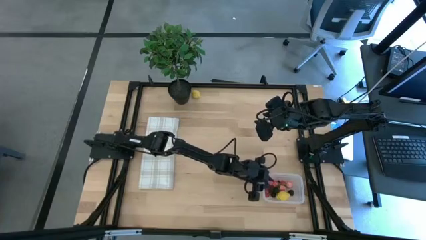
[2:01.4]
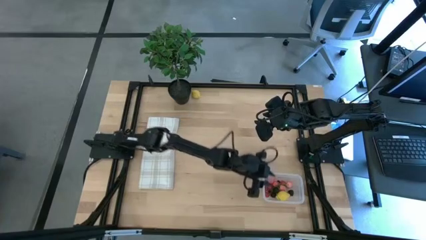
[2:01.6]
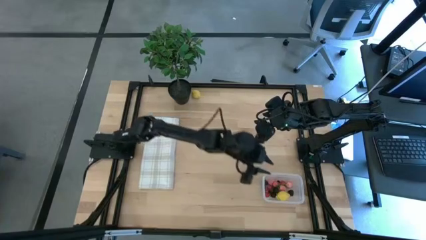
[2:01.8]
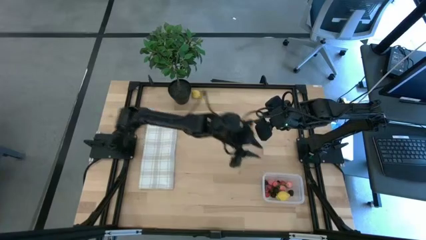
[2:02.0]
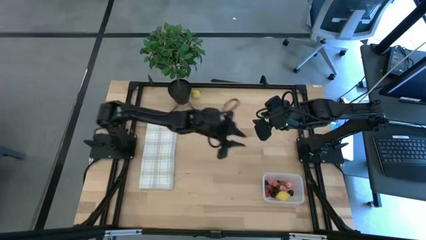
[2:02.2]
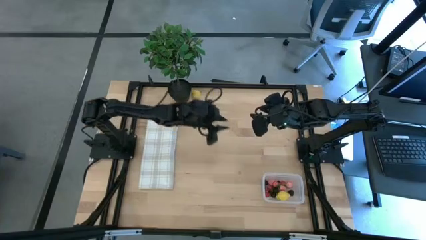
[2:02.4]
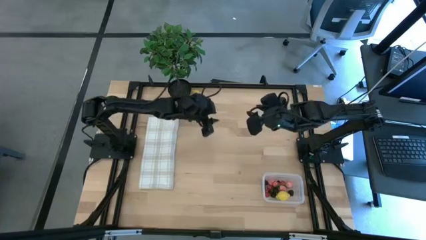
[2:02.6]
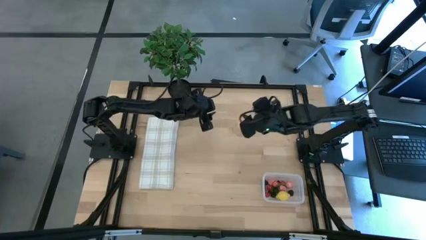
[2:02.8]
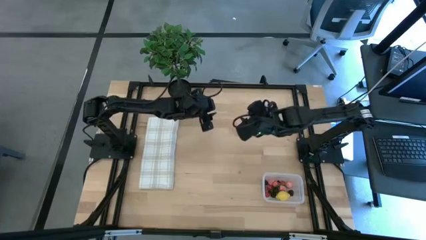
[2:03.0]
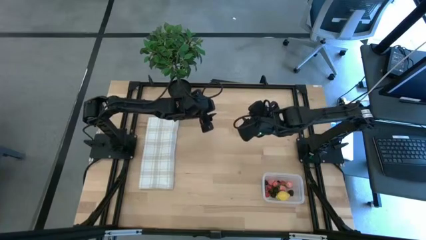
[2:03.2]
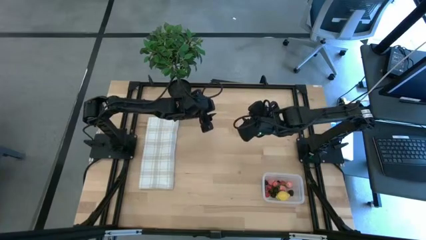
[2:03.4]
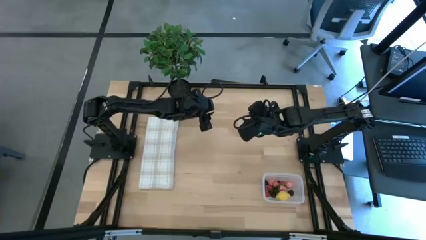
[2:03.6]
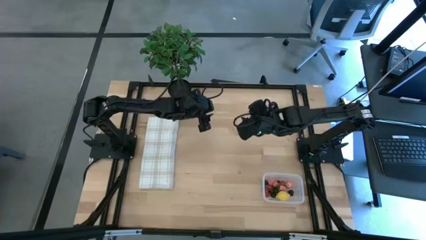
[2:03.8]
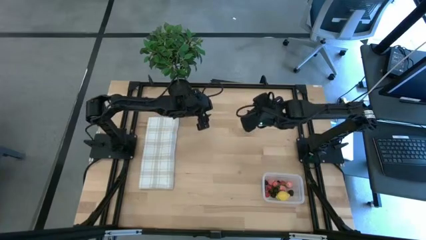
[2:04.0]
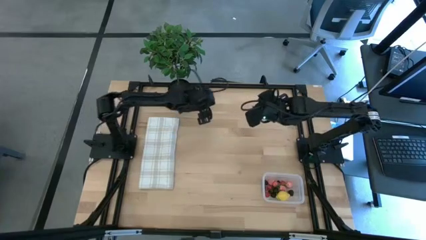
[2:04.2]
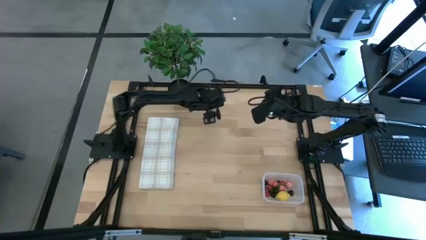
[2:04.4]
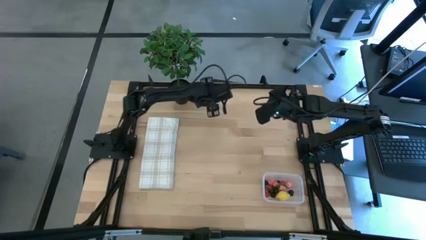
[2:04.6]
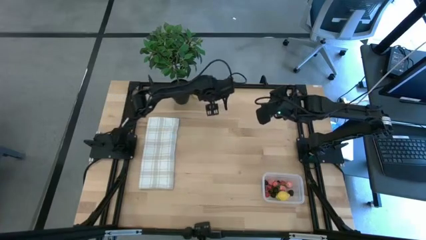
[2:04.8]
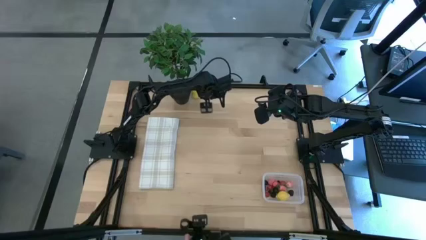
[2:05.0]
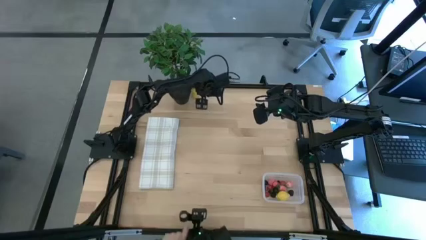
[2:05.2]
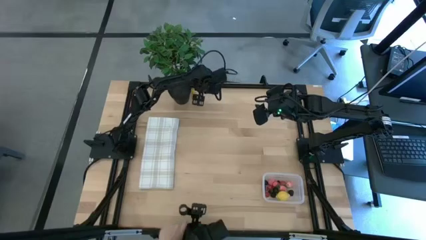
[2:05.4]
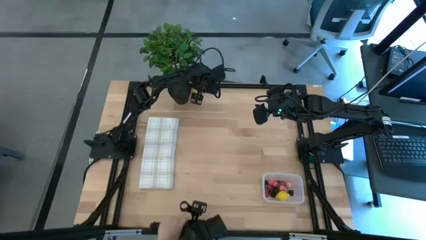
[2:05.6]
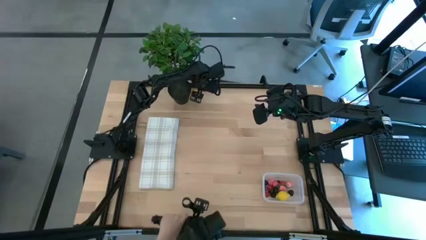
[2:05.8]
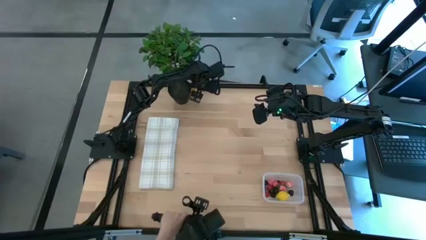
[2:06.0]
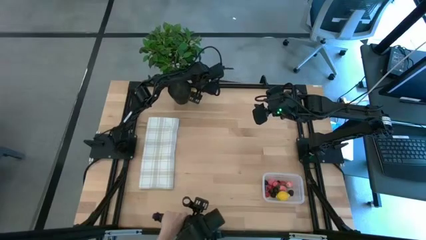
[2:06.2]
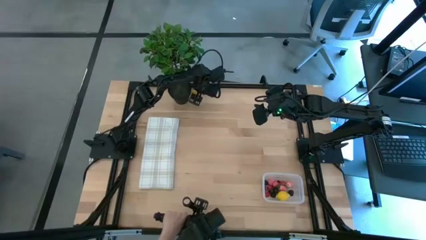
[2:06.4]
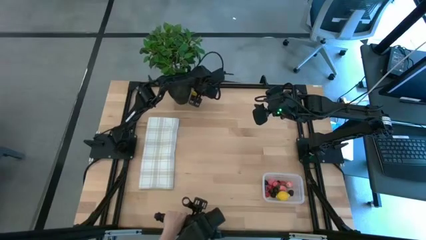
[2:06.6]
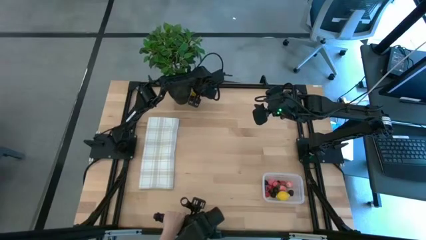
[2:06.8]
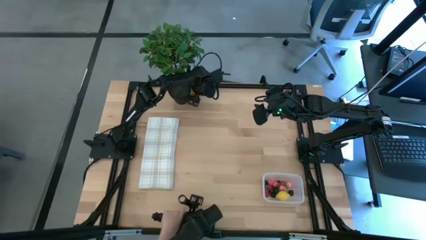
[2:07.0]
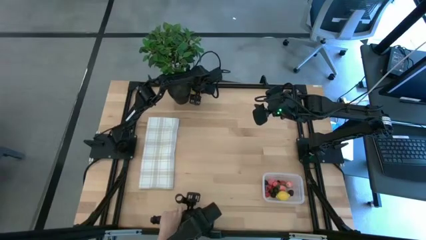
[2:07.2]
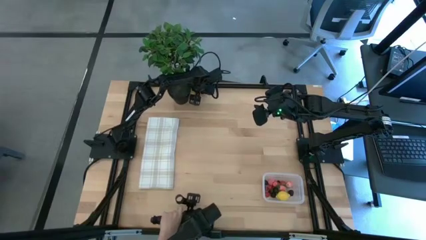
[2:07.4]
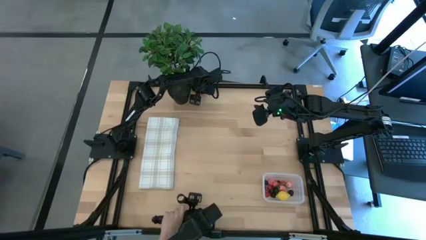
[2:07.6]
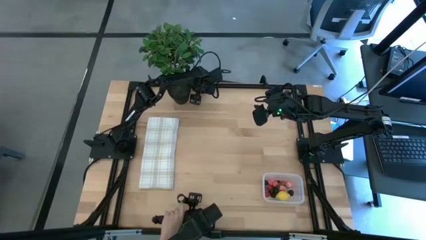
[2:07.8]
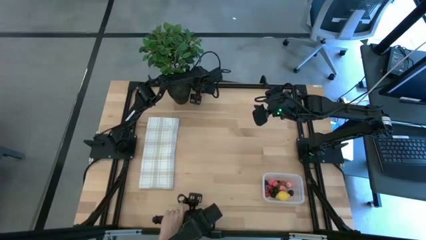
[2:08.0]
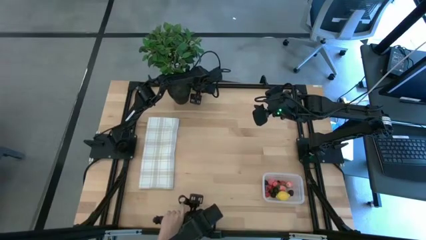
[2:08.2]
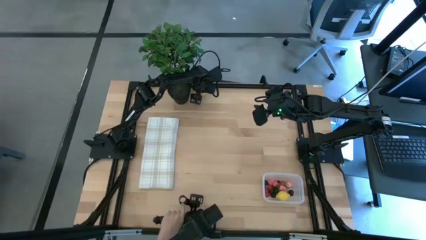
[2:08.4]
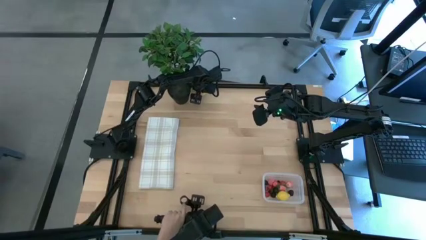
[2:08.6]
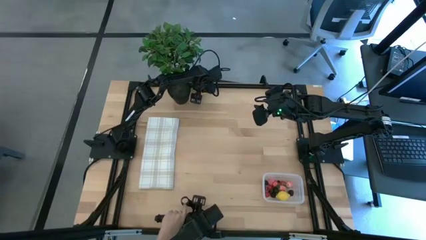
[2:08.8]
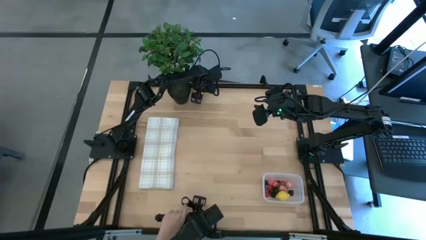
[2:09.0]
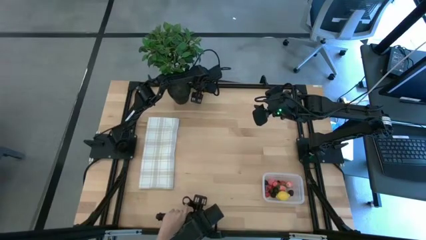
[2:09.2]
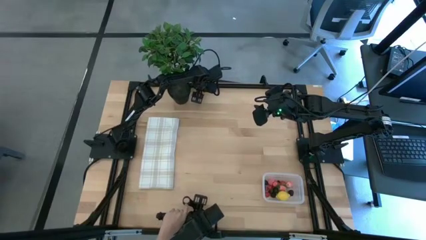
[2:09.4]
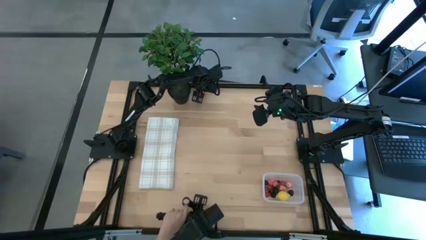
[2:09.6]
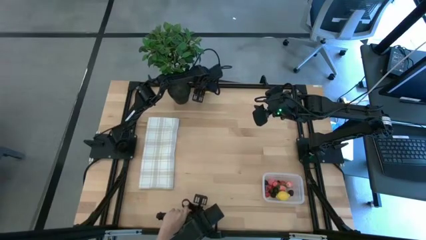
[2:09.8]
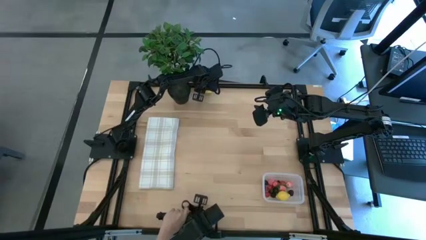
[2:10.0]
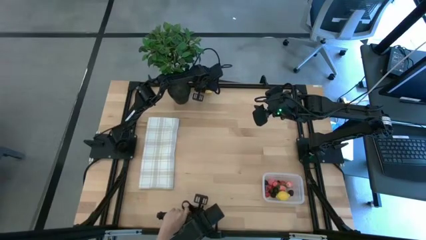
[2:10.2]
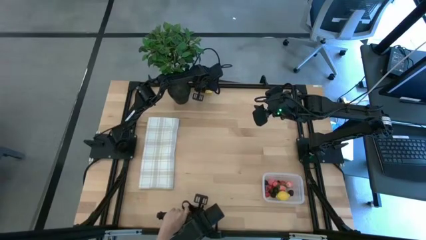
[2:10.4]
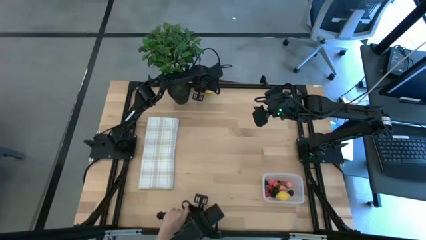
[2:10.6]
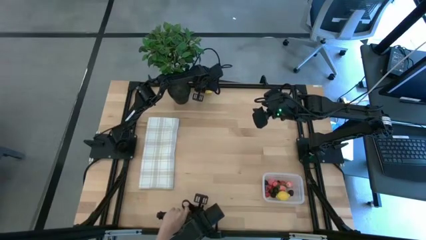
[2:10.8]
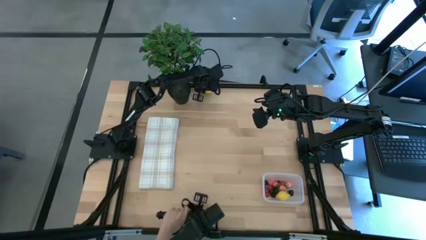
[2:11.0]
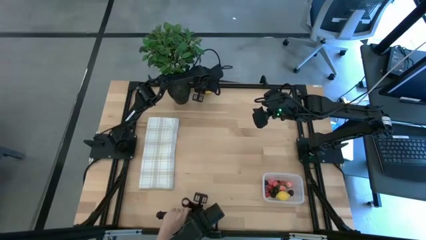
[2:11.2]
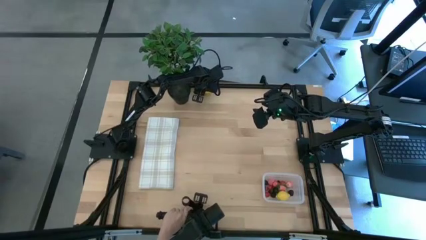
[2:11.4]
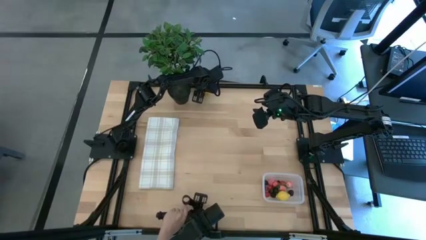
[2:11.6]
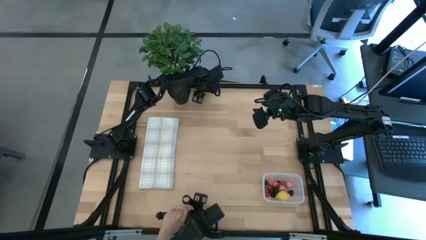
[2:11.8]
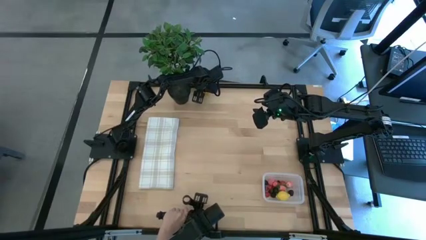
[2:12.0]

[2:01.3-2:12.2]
Task: Pick and placing Produce into tupperware
Put the yellow lemon into the transparent bin
